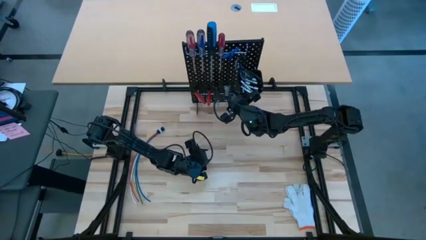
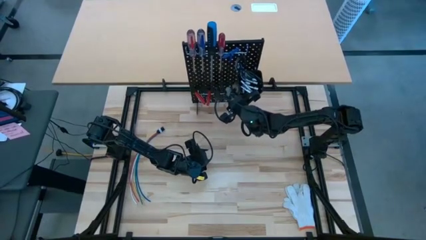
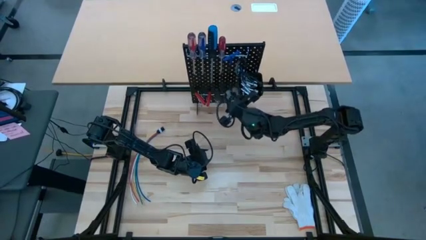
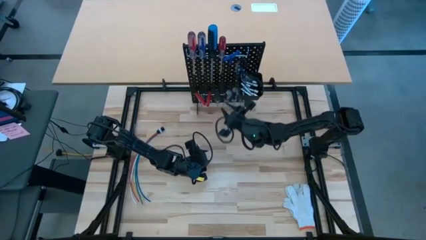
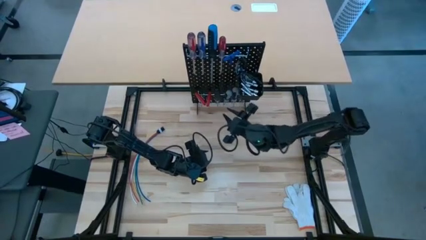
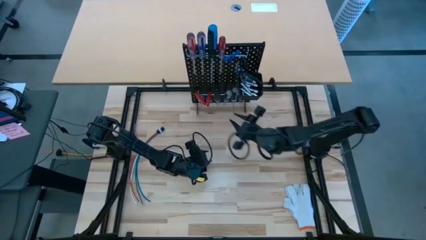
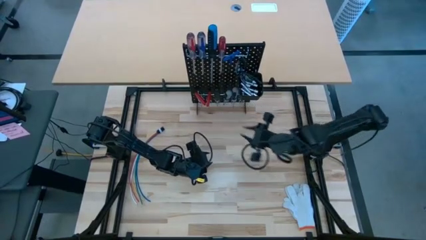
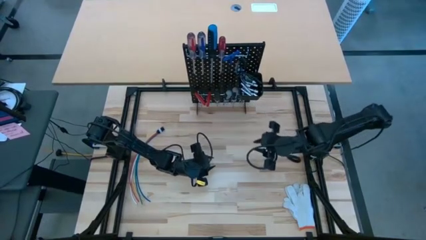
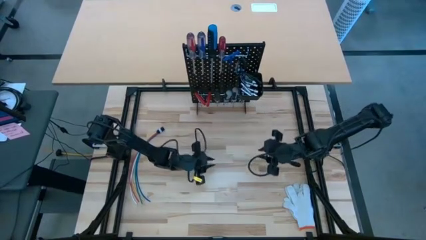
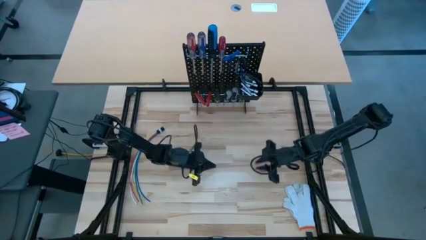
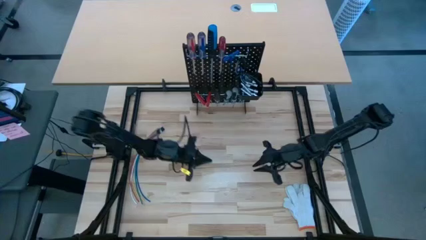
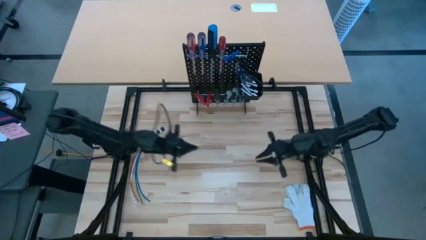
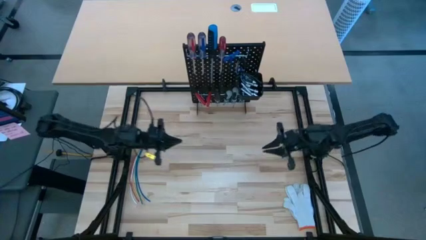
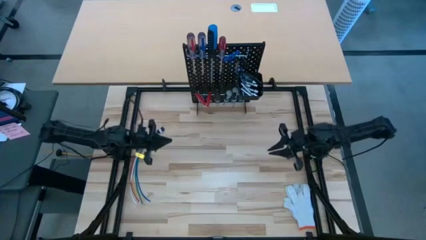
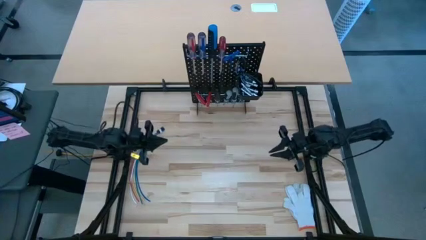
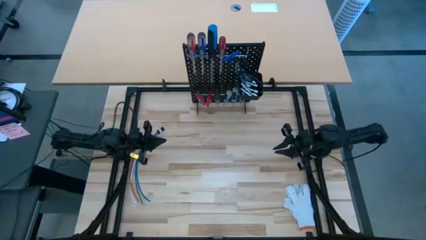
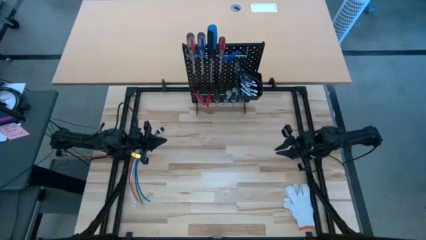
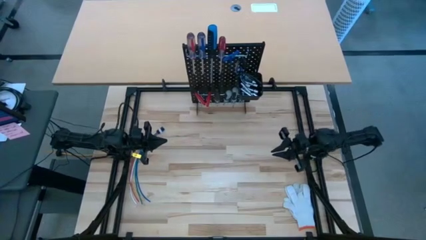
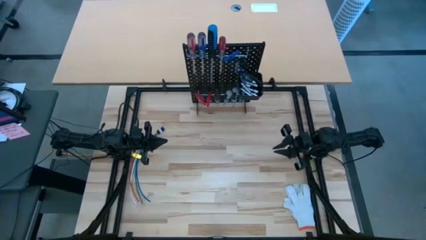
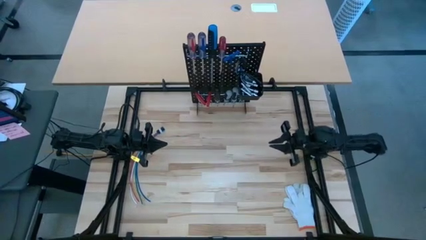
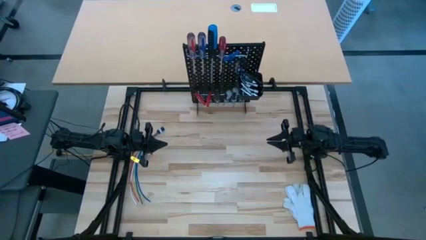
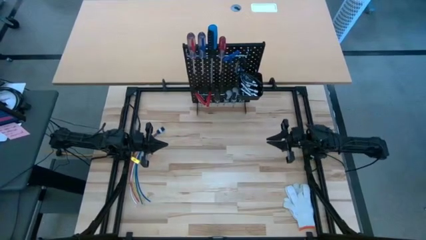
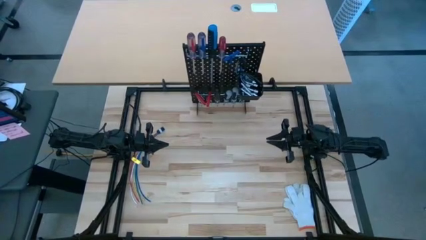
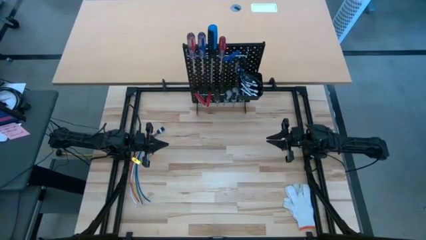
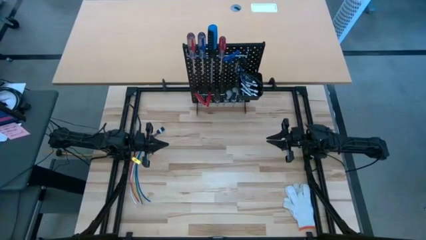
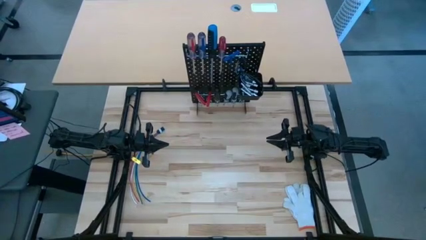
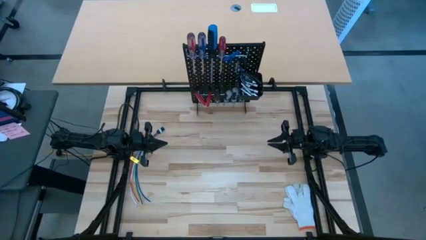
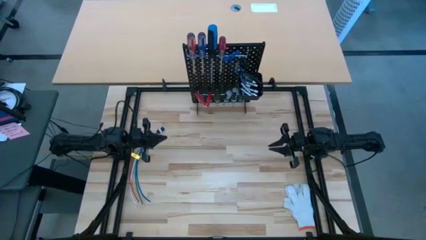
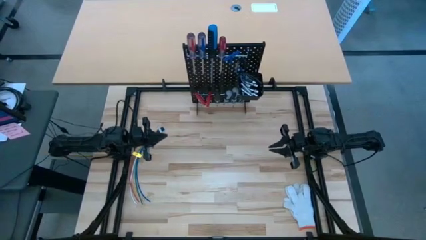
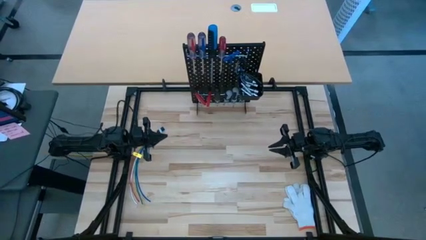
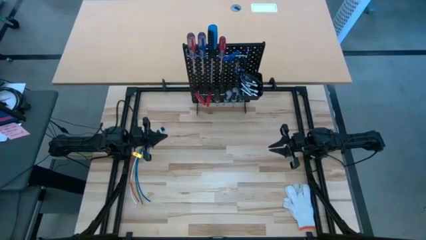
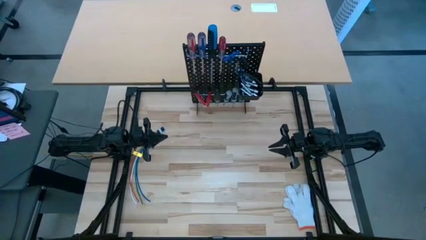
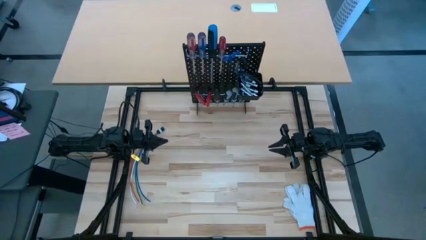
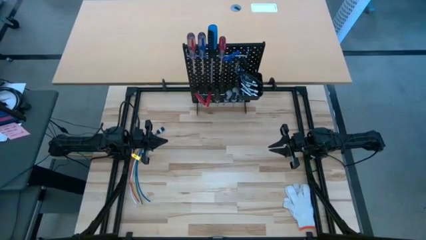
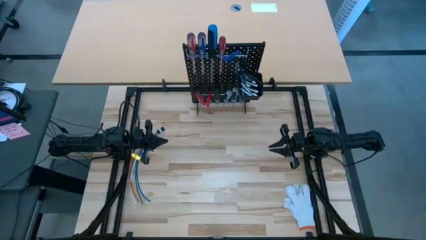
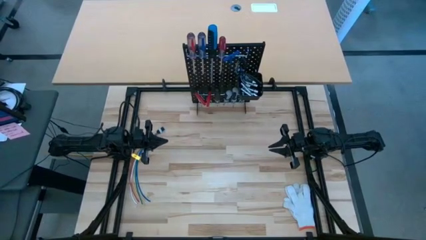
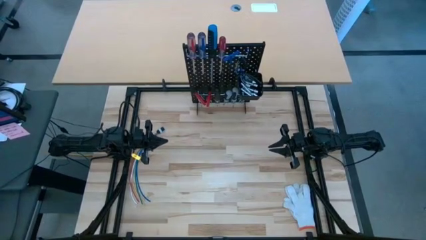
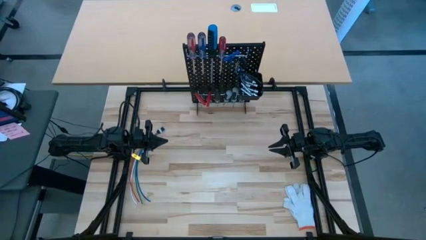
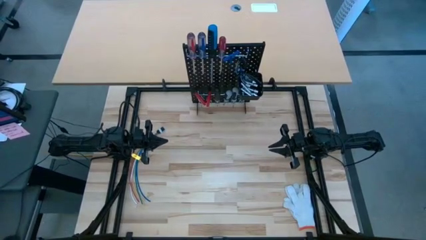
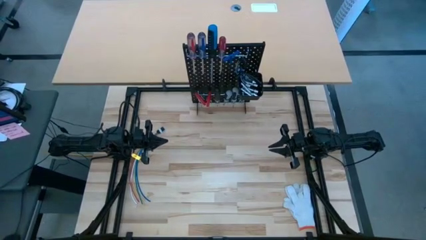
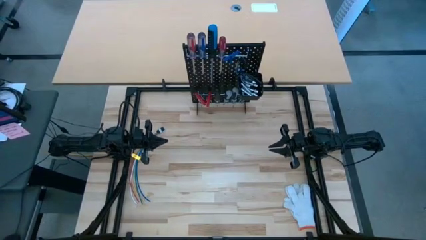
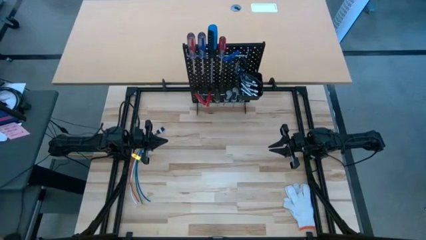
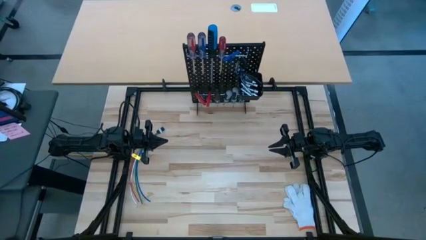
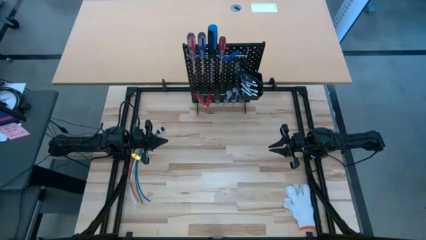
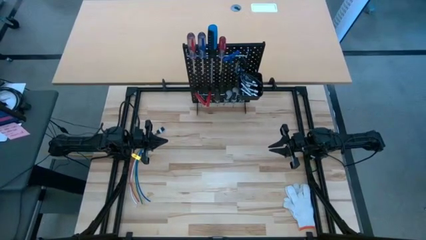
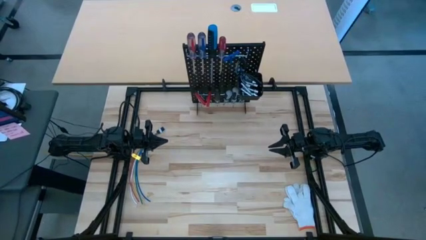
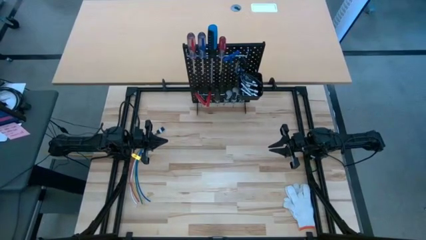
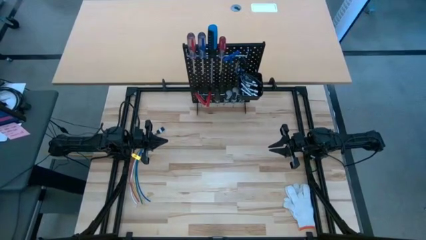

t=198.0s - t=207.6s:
Task: Hang tools onto peg board
Return to Home Position

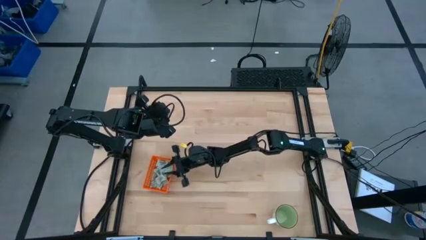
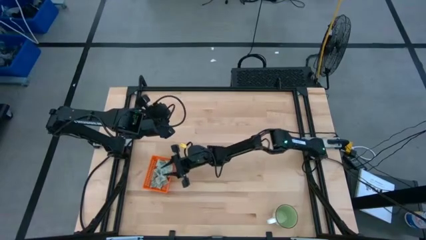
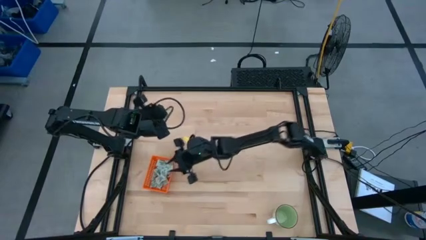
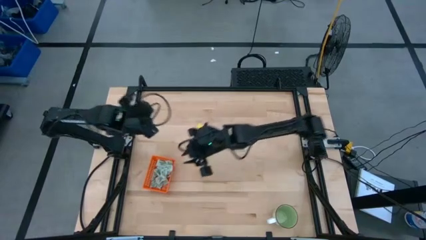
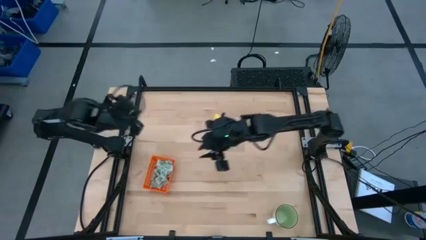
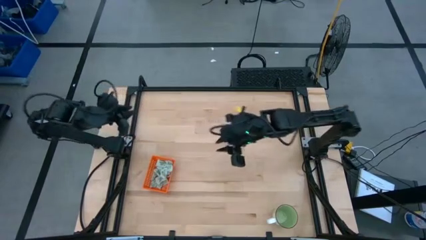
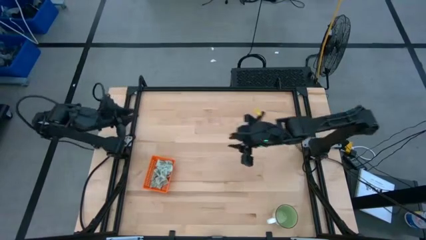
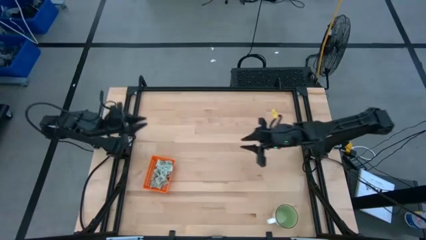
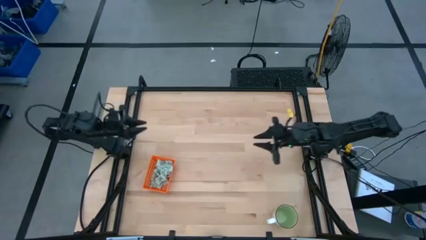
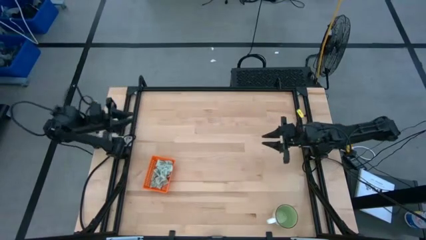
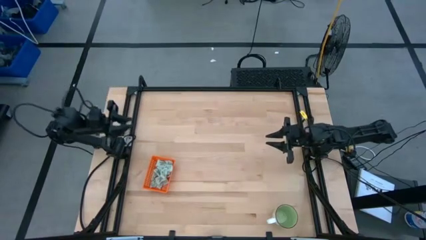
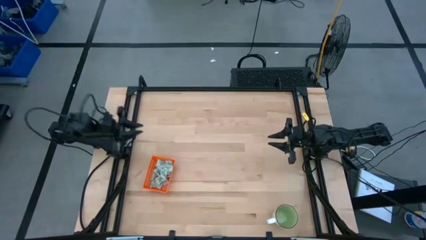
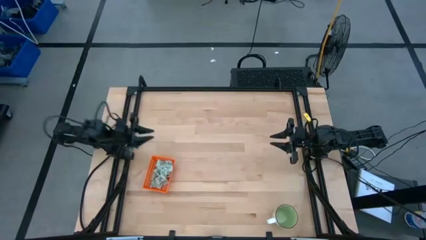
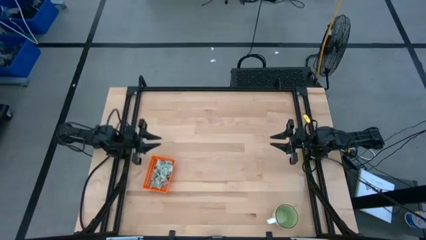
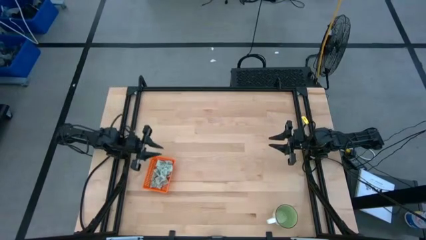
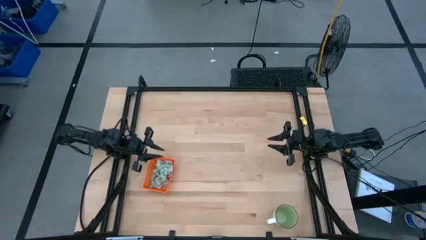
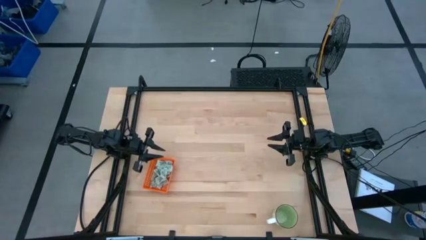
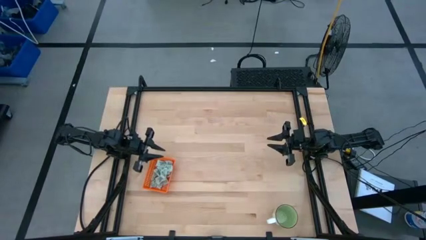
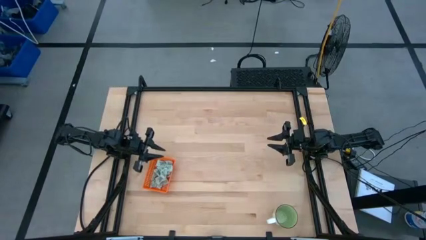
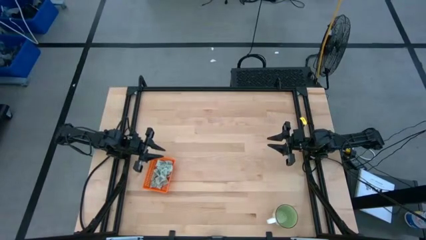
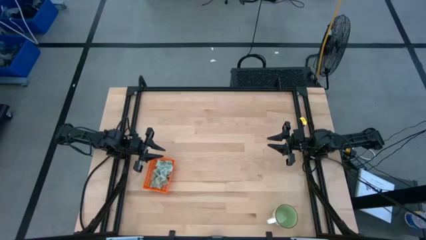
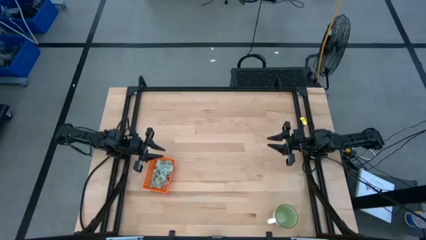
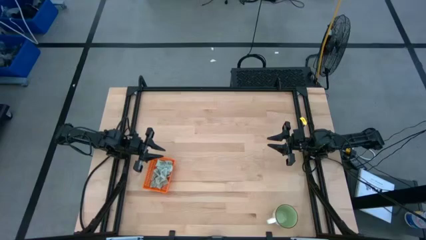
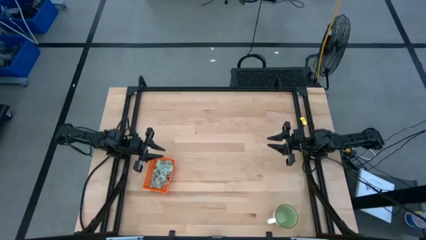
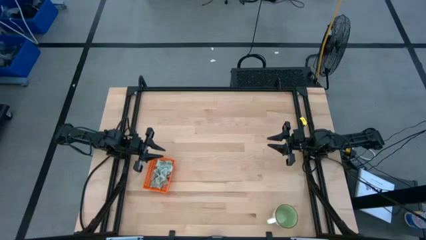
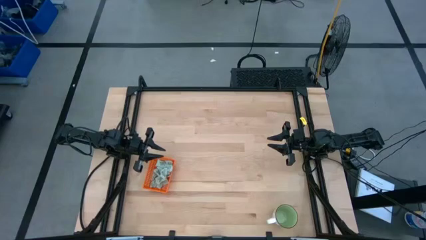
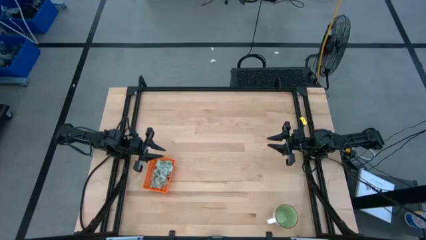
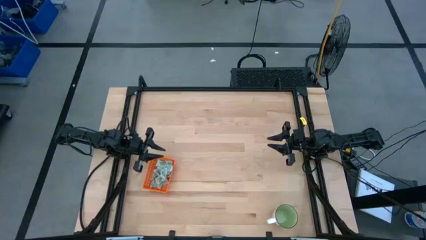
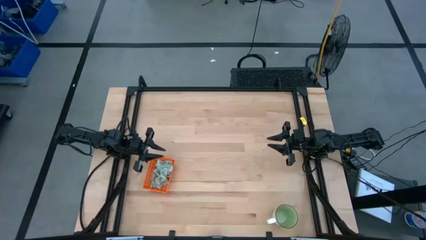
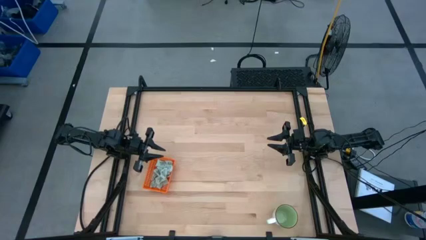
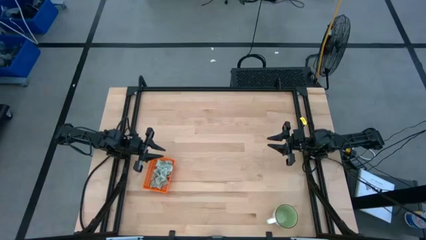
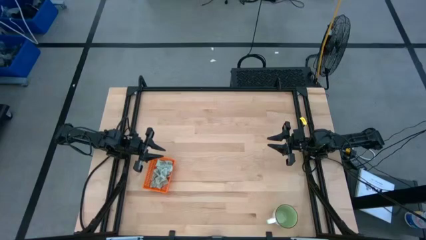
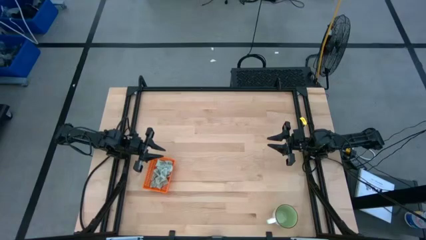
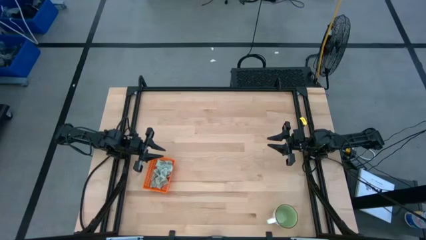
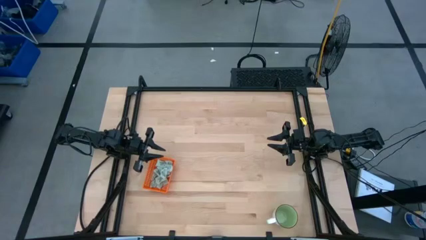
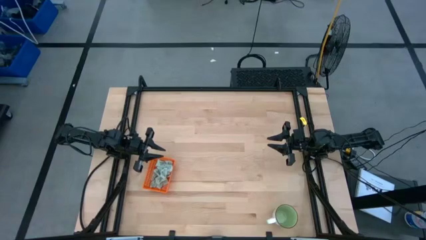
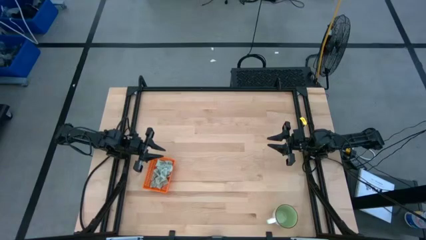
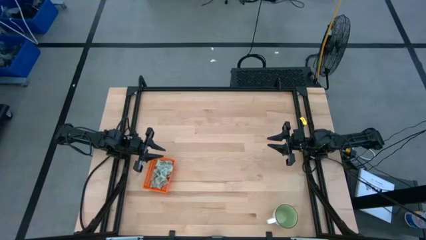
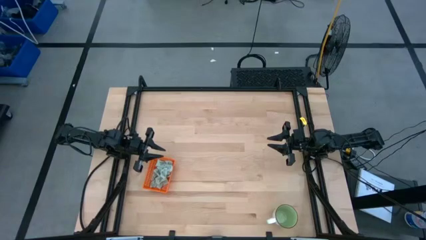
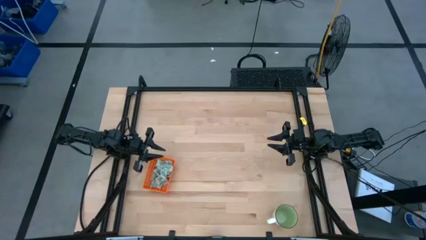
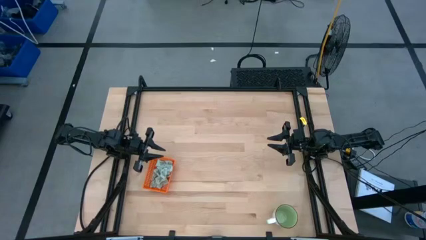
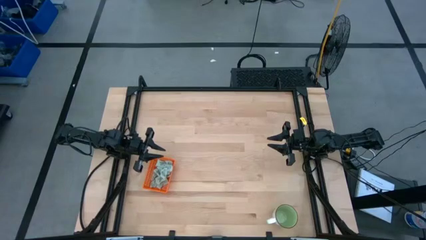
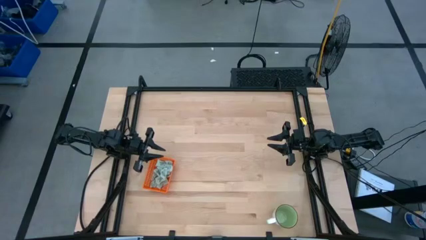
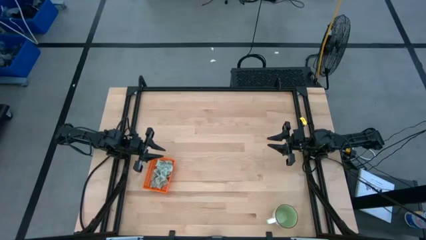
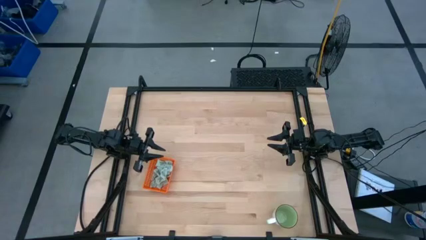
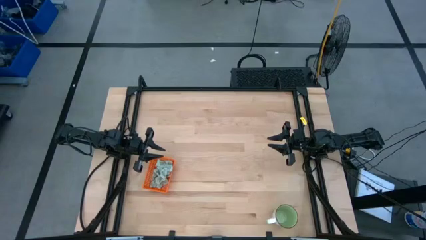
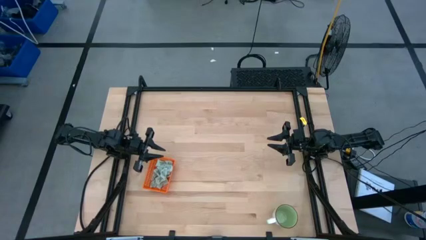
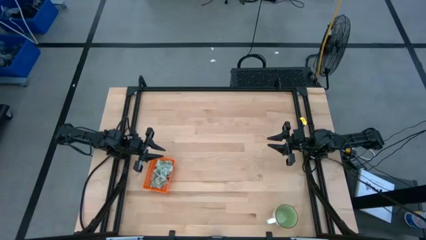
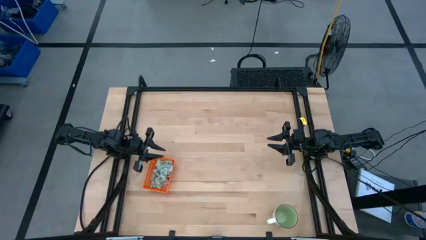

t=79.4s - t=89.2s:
Task: Pick and place Stevia / Truvia into bins
Return to Home Position
